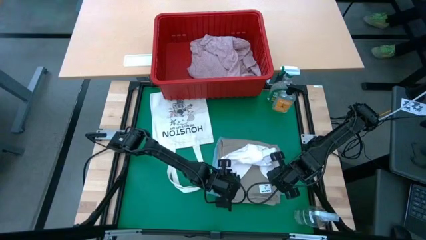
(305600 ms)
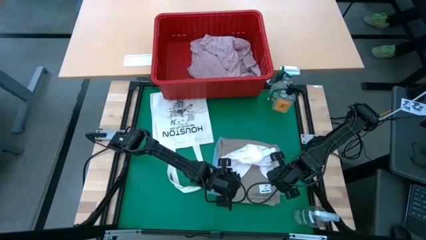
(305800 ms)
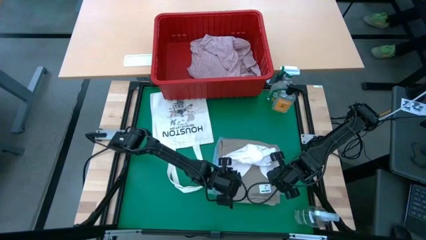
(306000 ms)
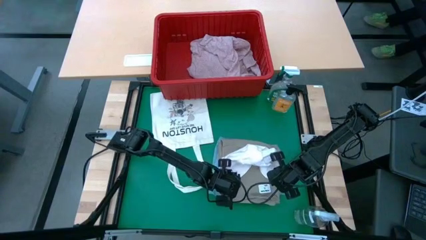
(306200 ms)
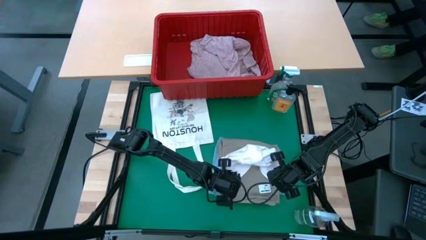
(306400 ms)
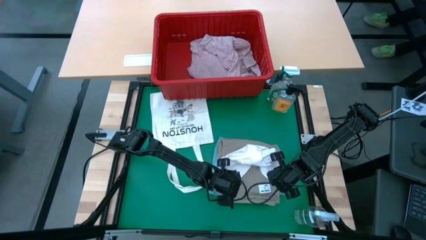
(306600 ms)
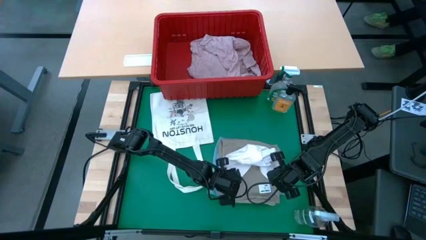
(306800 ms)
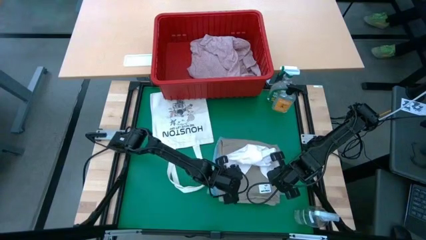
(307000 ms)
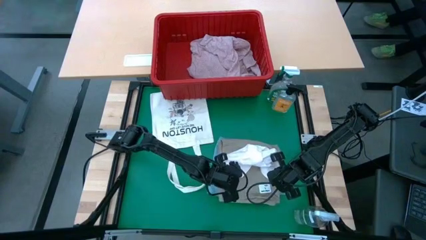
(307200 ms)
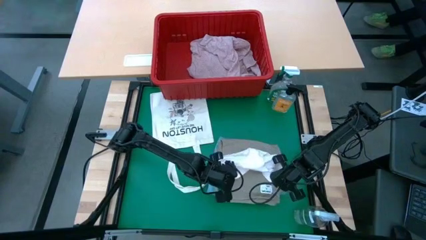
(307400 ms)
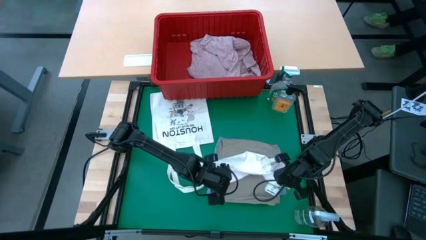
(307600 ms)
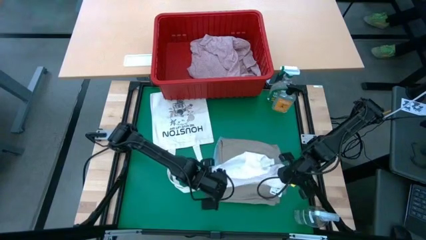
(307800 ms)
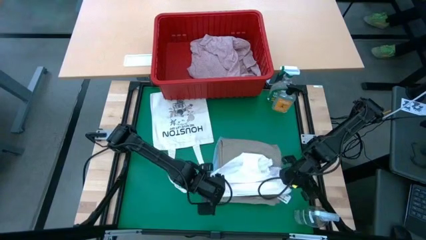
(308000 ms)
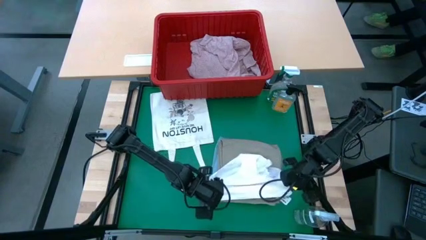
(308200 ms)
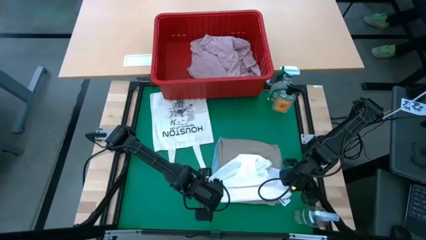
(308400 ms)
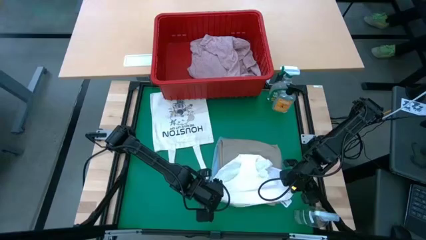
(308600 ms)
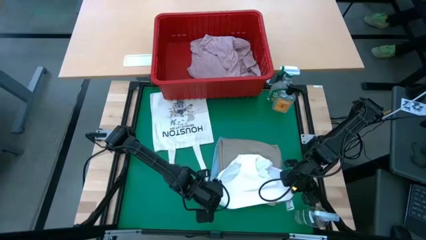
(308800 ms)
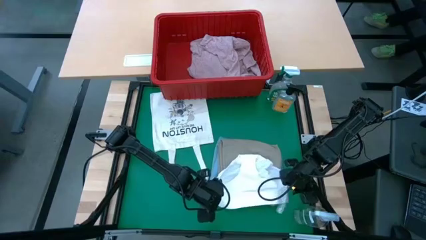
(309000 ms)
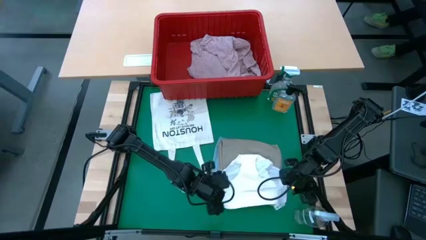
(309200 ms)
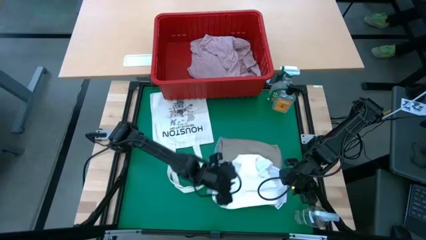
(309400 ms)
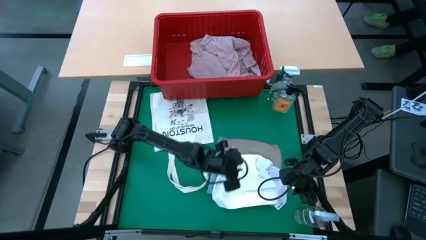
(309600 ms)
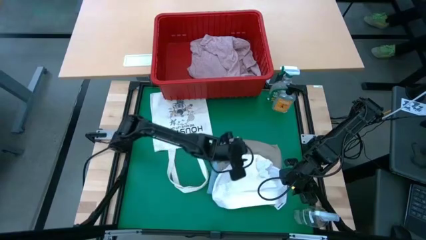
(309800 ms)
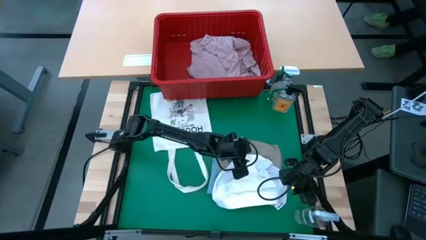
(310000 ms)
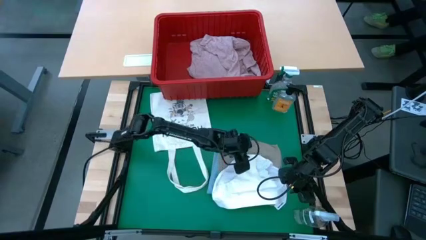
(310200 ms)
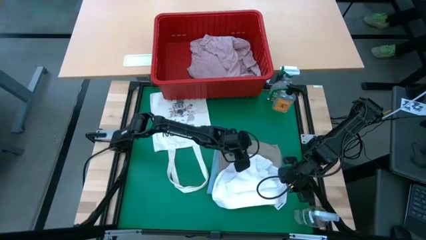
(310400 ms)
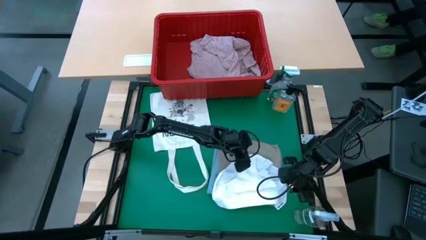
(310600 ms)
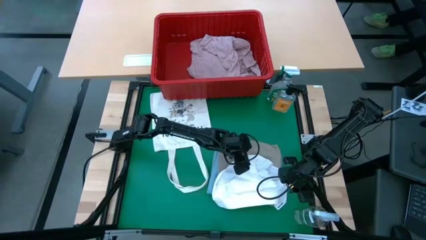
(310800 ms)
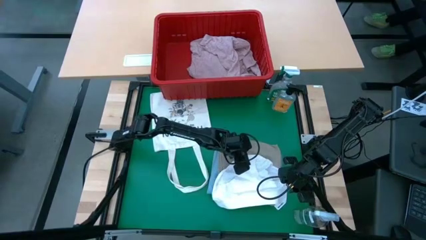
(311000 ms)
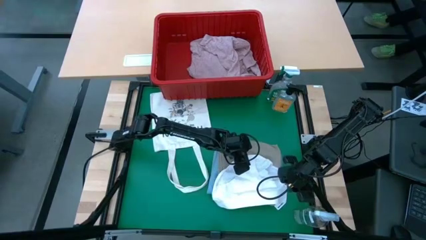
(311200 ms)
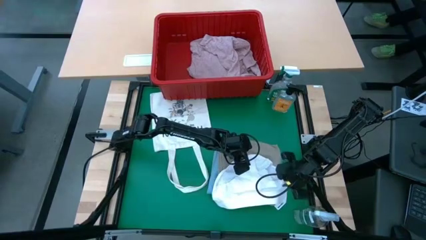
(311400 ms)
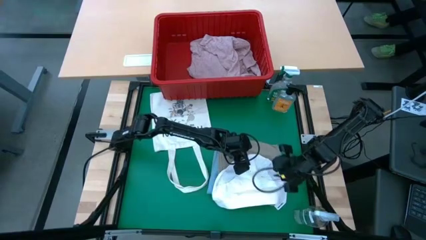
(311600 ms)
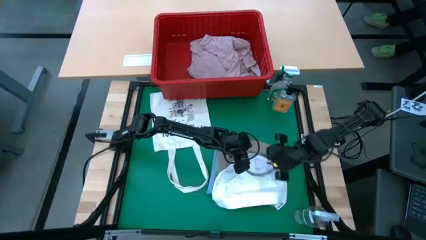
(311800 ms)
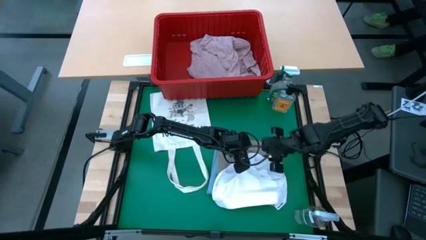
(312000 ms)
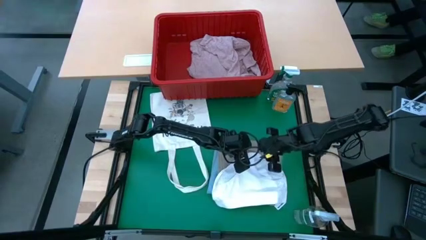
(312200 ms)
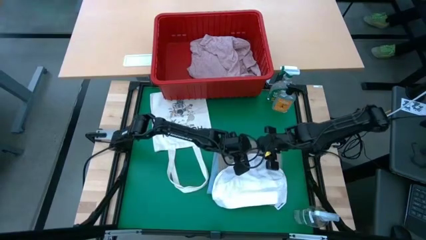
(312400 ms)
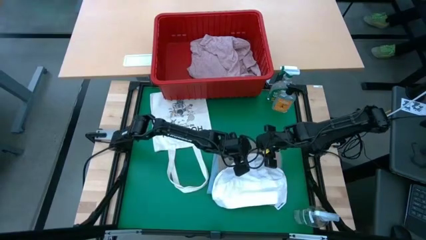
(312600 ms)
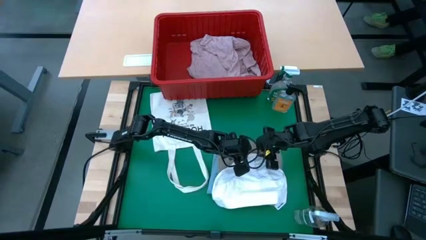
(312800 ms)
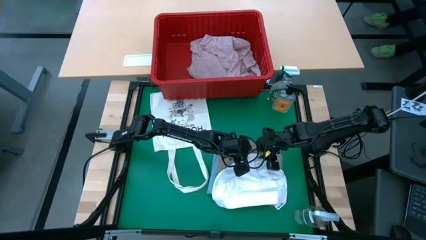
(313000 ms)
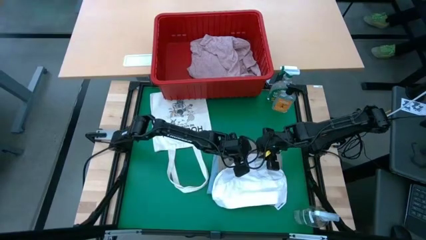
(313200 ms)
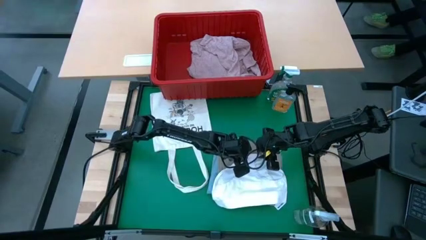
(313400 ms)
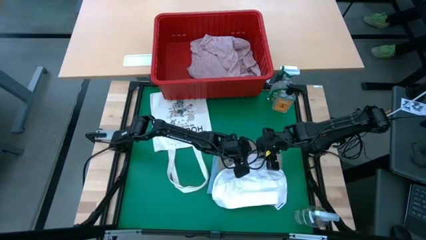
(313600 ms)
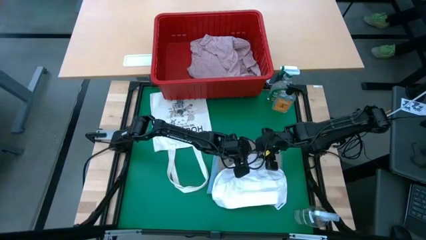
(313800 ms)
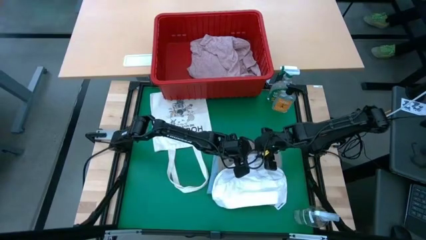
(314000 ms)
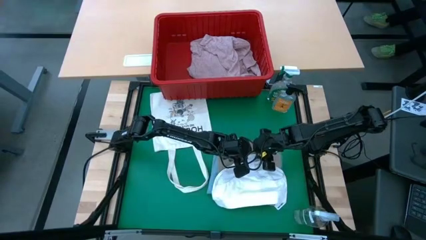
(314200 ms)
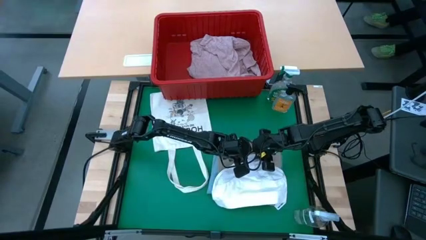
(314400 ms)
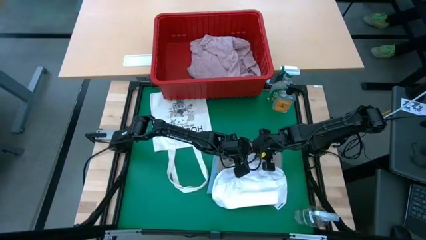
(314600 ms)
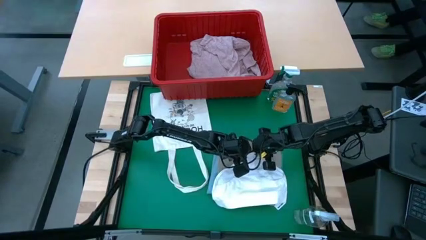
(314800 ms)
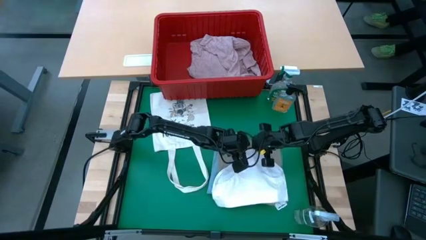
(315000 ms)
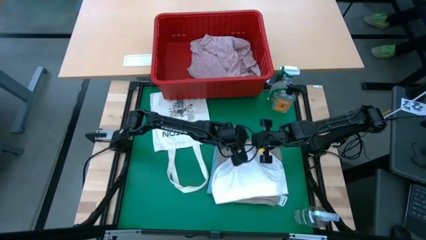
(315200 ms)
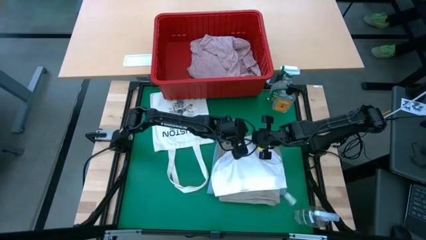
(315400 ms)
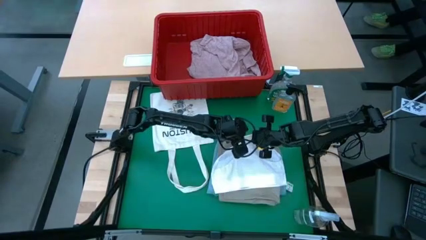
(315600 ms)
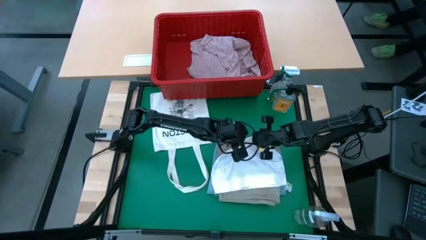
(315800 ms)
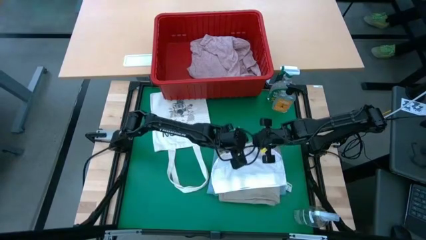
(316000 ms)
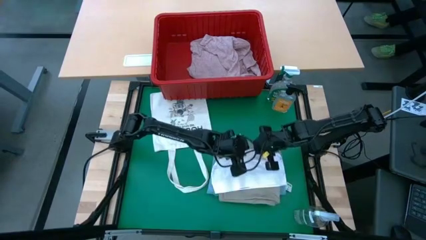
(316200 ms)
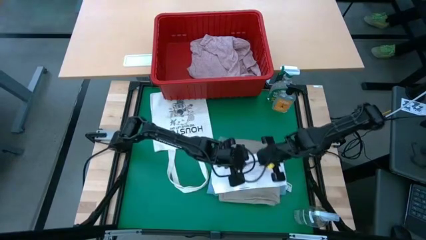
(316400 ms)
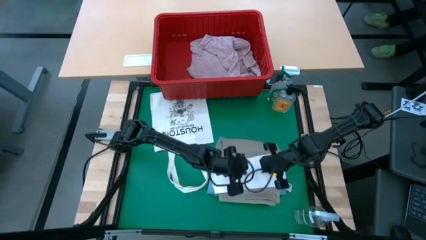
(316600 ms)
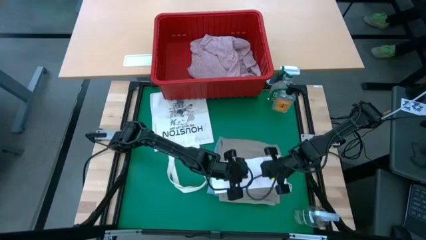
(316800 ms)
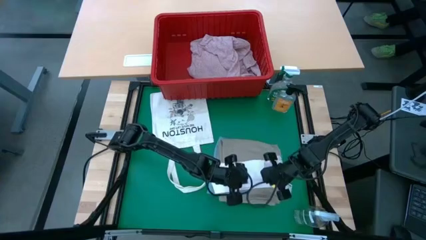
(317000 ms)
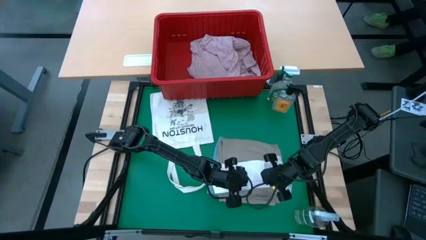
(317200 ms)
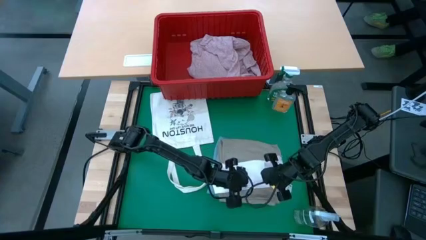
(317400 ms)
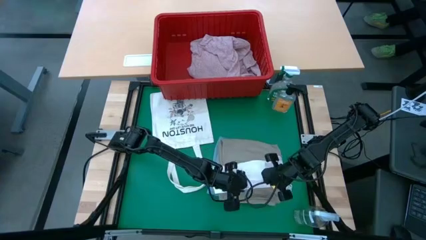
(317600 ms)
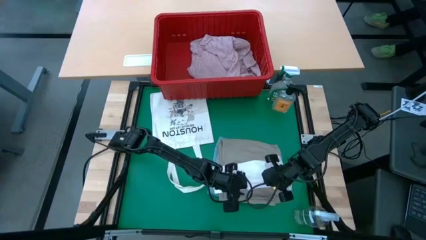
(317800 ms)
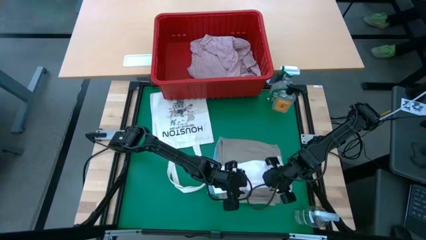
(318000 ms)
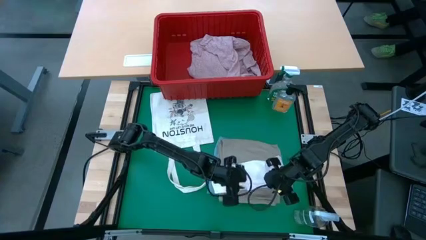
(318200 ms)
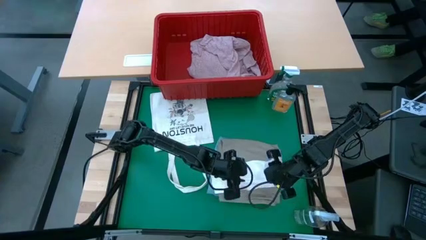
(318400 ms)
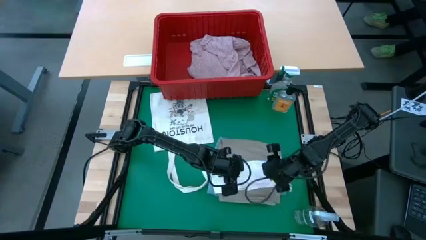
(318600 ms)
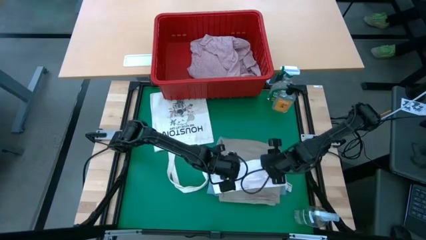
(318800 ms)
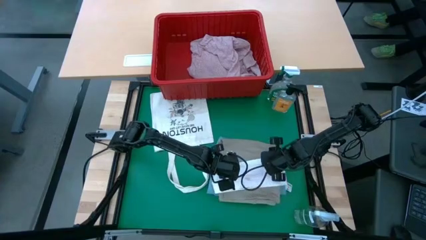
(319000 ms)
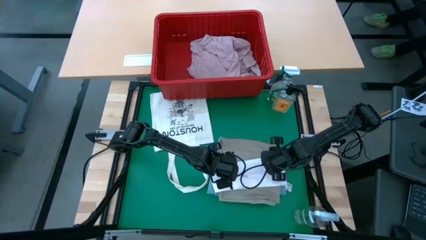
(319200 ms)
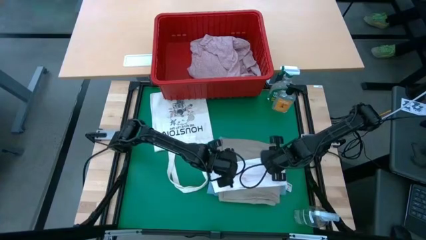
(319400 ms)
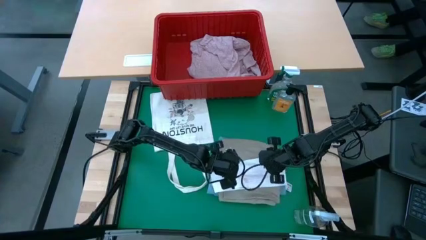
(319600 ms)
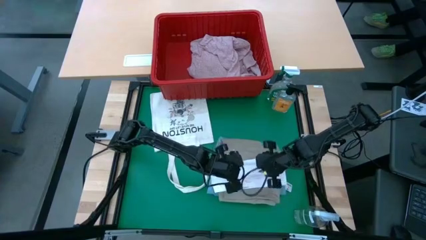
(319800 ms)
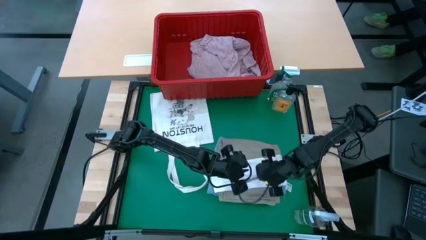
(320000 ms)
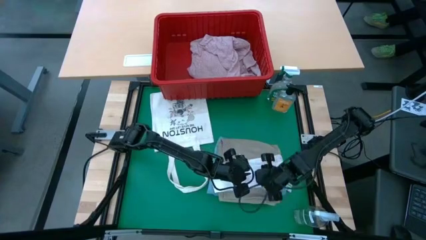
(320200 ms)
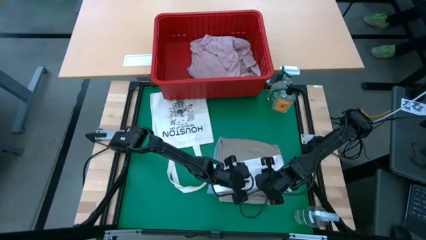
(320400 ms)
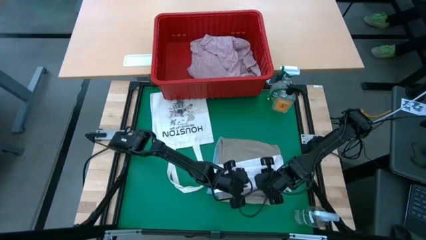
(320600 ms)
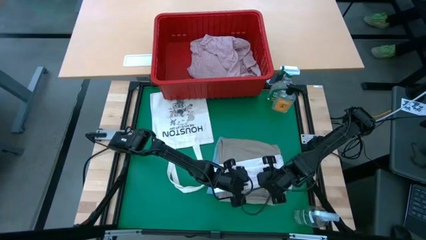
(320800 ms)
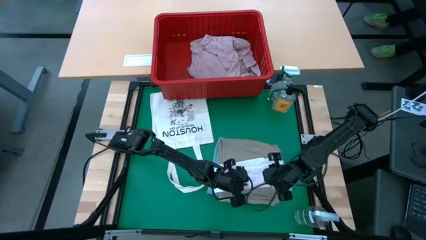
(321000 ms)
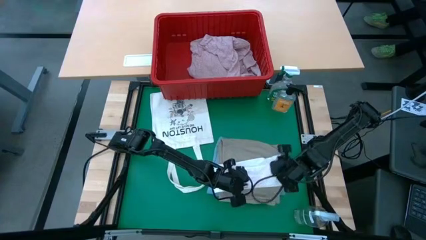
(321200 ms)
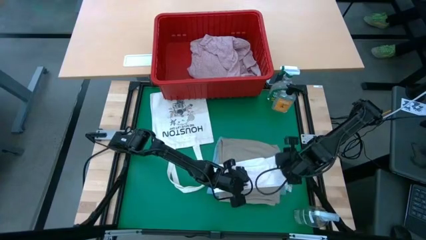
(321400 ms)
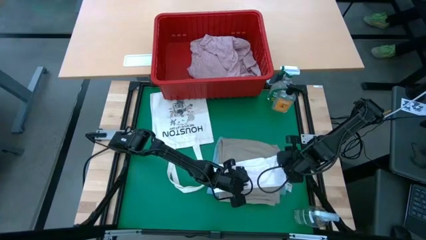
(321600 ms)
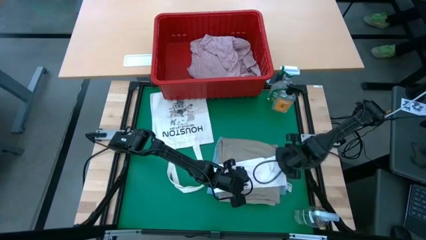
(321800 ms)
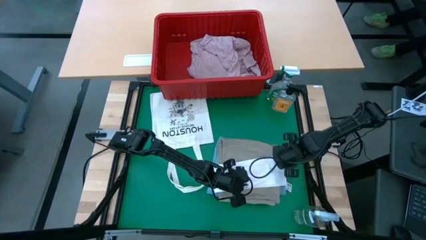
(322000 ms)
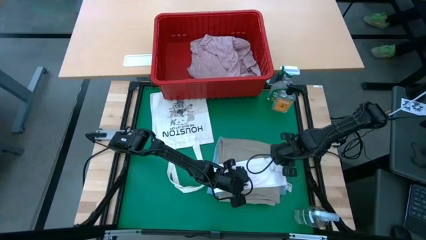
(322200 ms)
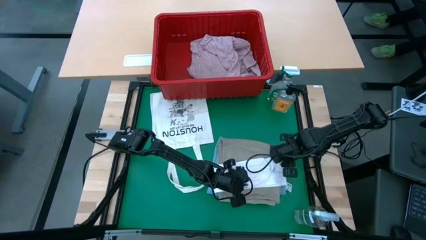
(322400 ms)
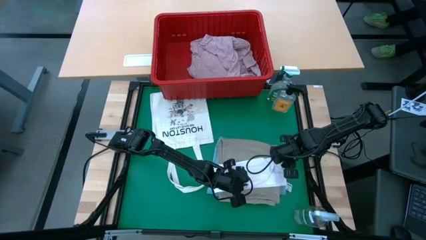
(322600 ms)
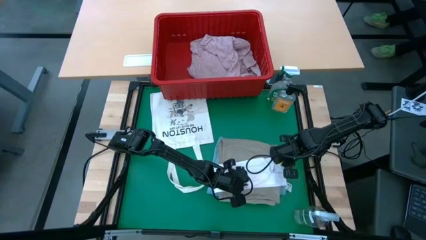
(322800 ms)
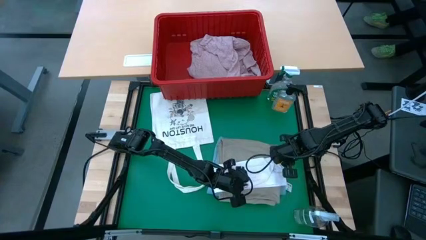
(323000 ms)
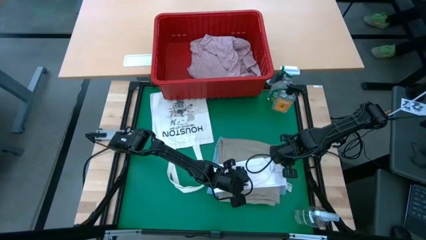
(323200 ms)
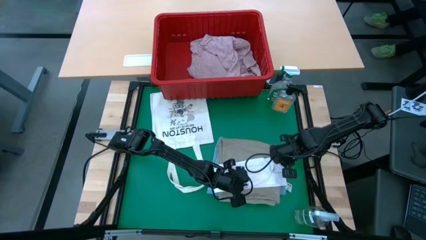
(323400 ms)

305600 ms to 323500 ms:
Task: Fold laundry
Fold the white underwear
